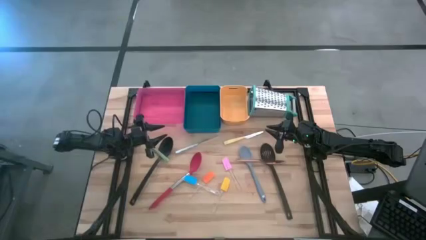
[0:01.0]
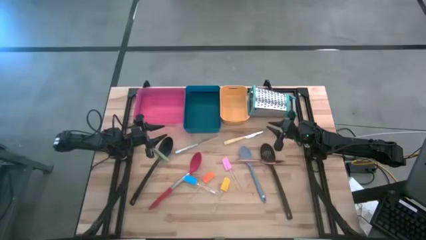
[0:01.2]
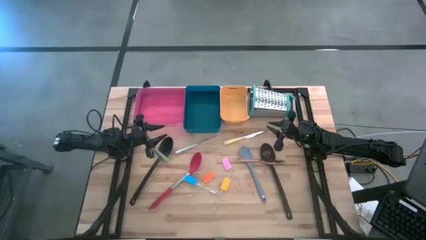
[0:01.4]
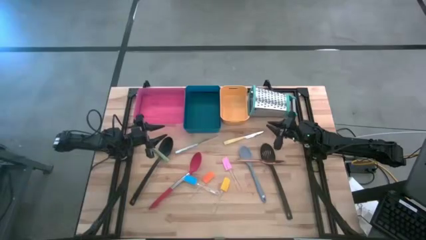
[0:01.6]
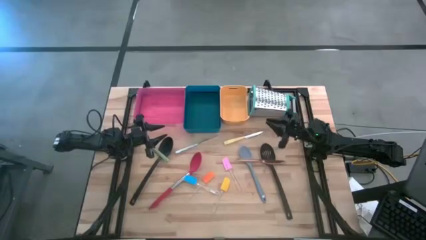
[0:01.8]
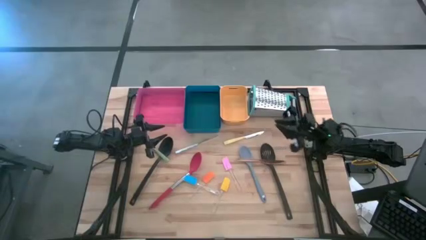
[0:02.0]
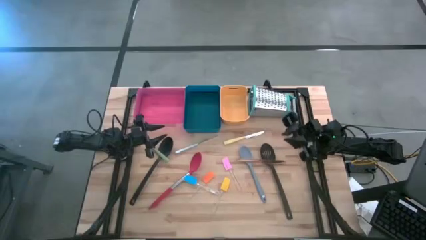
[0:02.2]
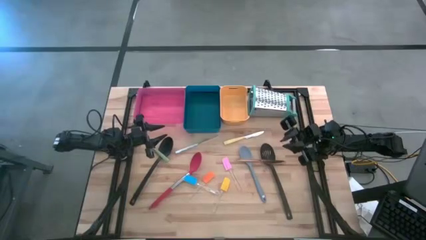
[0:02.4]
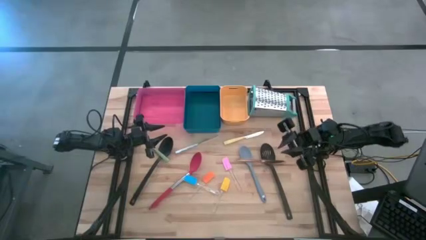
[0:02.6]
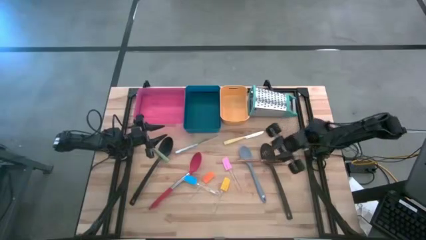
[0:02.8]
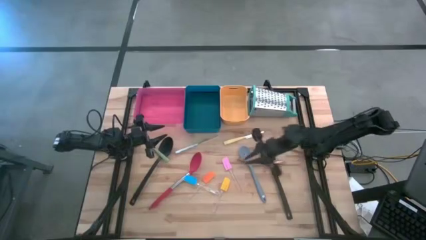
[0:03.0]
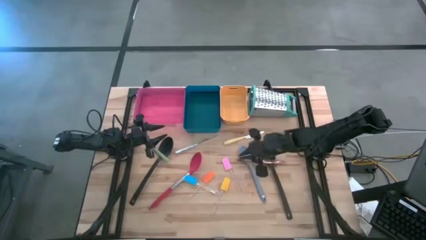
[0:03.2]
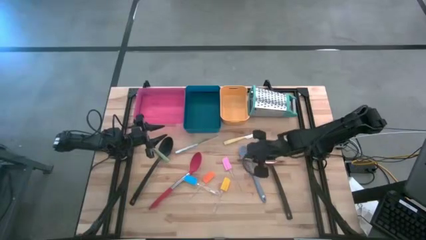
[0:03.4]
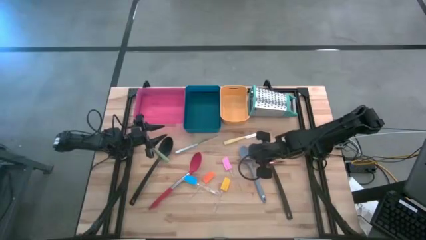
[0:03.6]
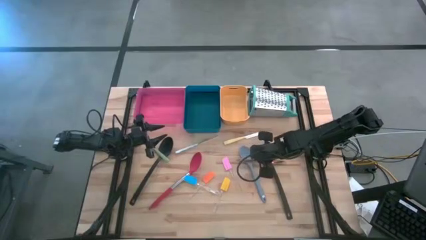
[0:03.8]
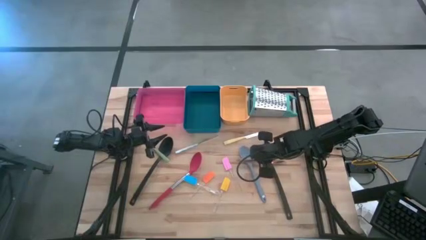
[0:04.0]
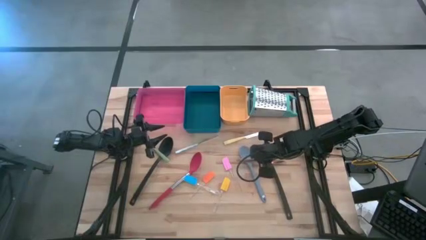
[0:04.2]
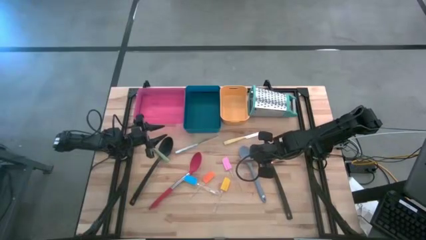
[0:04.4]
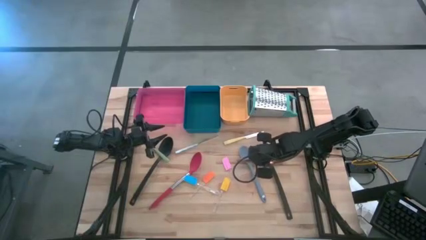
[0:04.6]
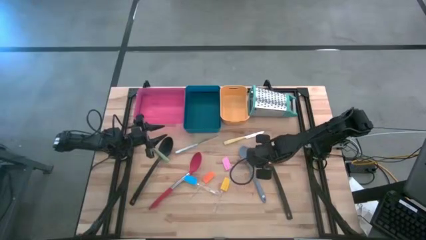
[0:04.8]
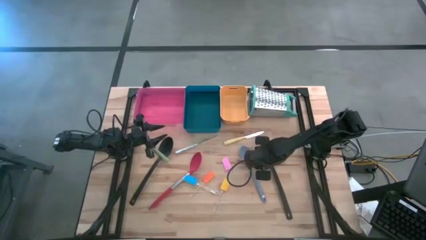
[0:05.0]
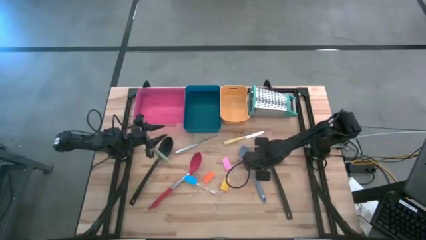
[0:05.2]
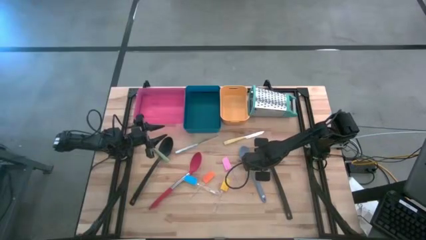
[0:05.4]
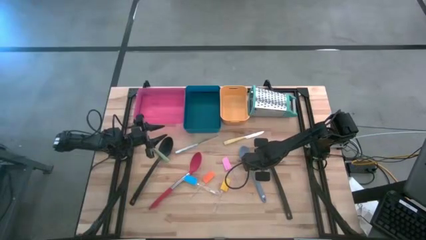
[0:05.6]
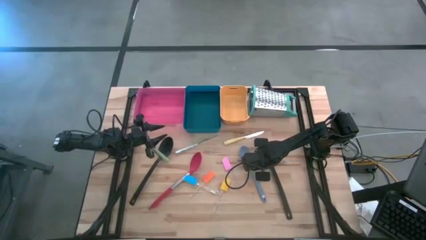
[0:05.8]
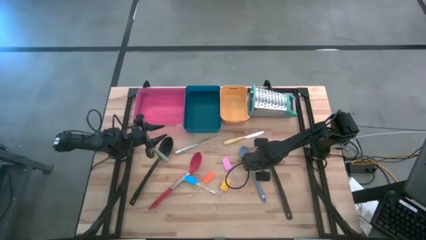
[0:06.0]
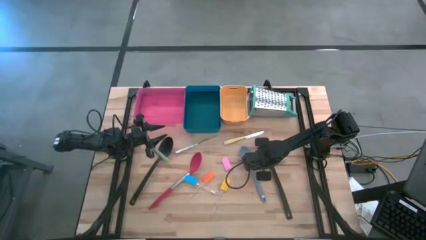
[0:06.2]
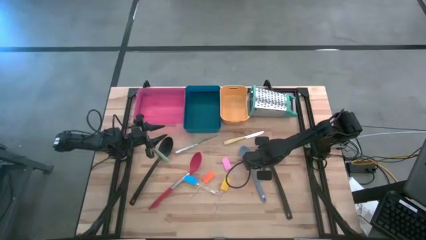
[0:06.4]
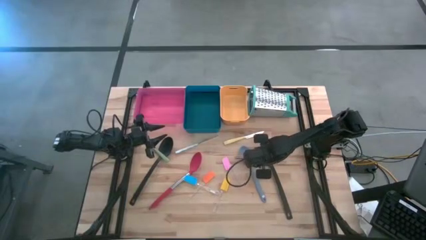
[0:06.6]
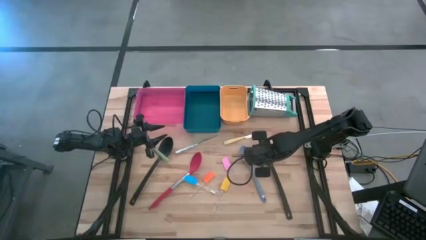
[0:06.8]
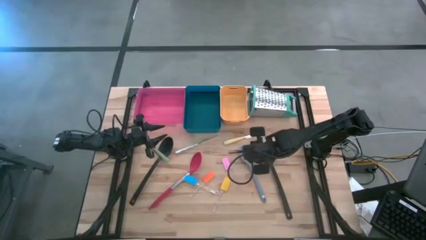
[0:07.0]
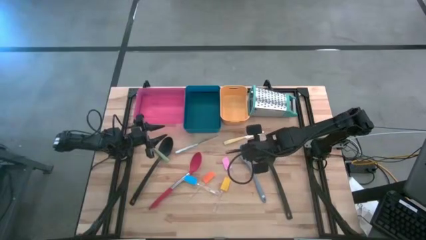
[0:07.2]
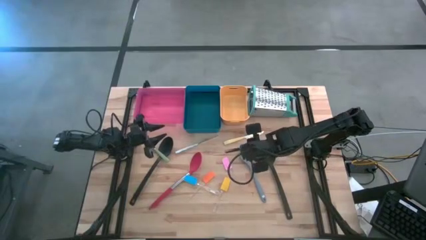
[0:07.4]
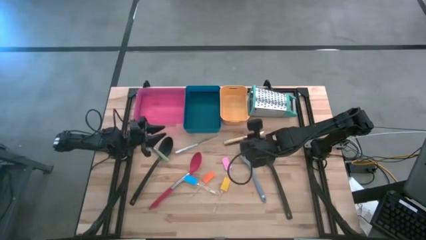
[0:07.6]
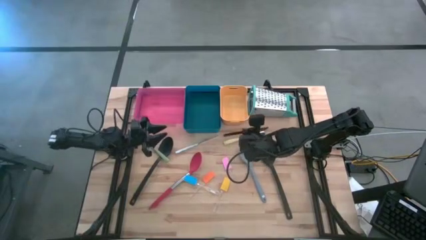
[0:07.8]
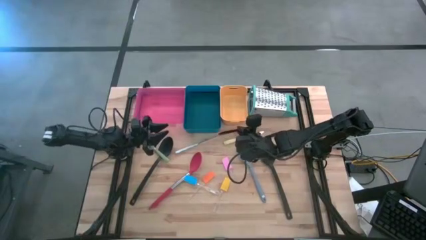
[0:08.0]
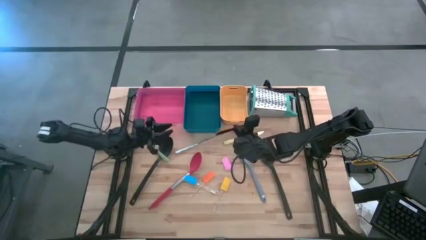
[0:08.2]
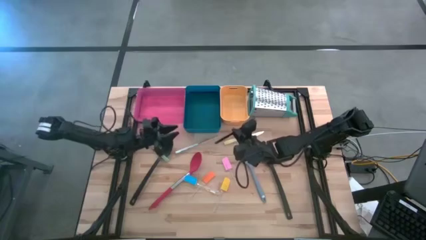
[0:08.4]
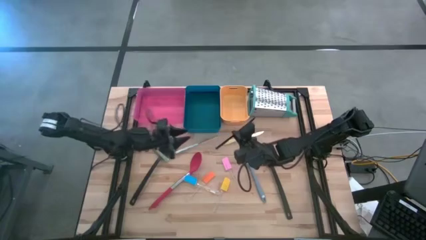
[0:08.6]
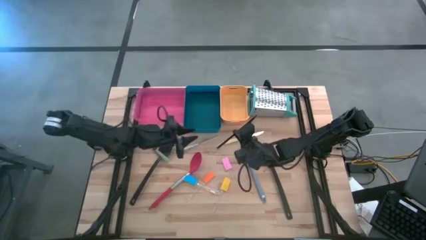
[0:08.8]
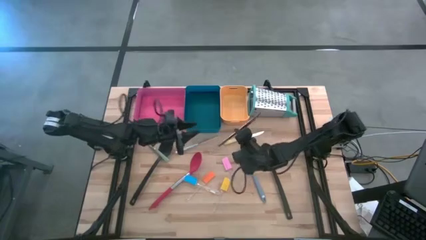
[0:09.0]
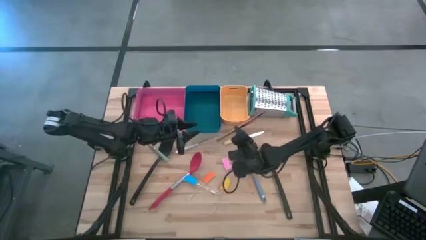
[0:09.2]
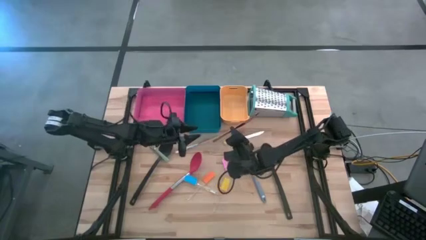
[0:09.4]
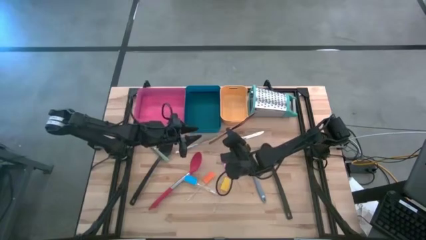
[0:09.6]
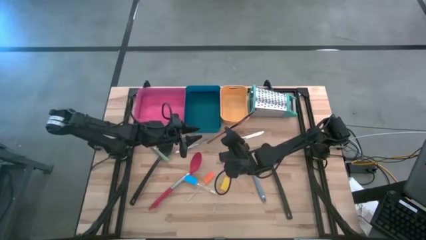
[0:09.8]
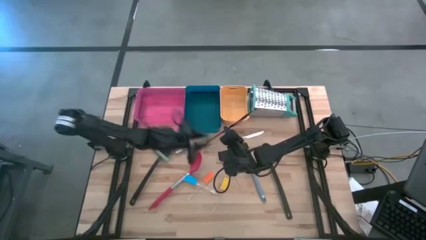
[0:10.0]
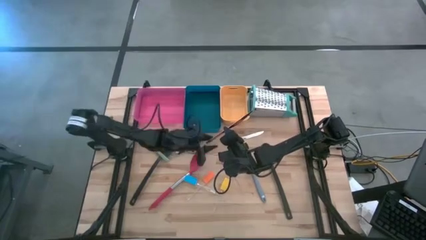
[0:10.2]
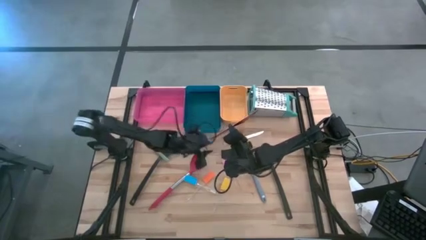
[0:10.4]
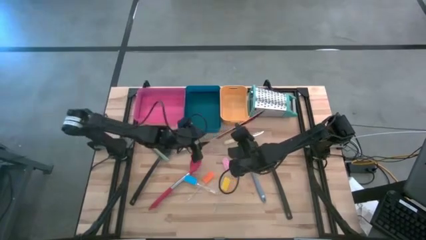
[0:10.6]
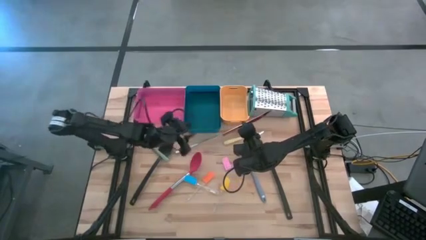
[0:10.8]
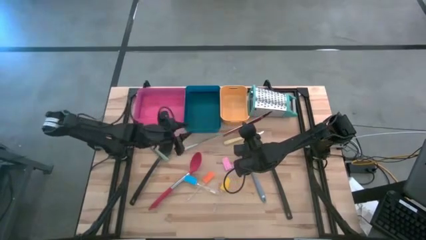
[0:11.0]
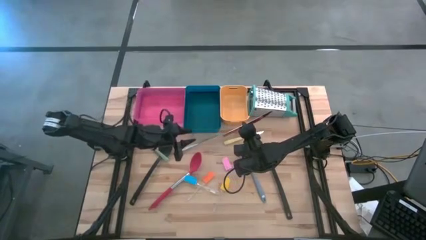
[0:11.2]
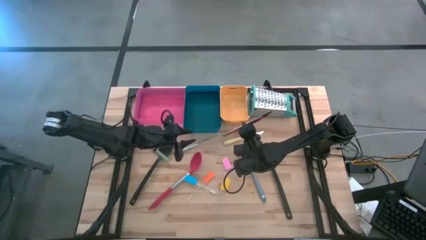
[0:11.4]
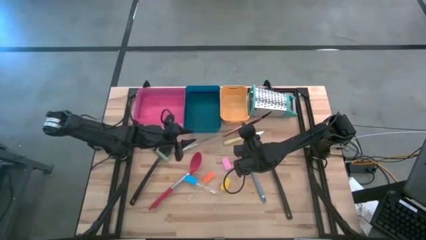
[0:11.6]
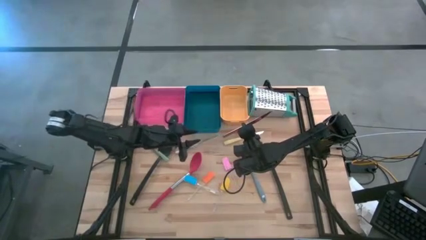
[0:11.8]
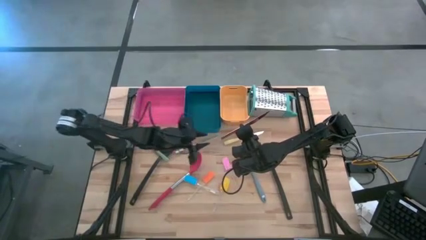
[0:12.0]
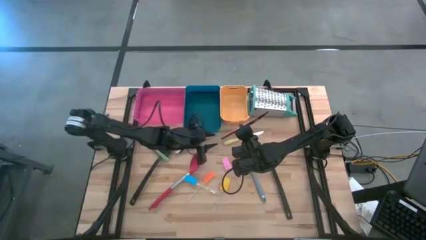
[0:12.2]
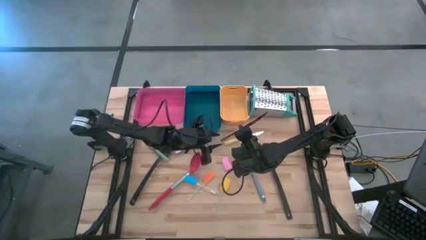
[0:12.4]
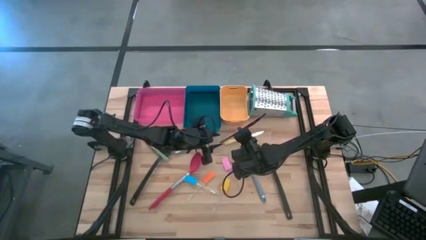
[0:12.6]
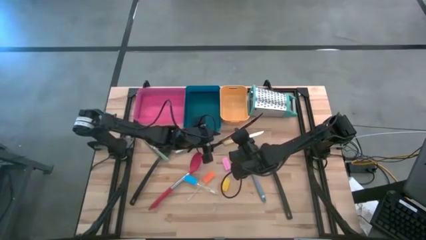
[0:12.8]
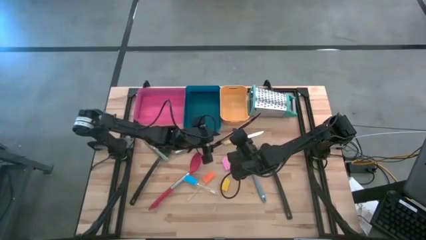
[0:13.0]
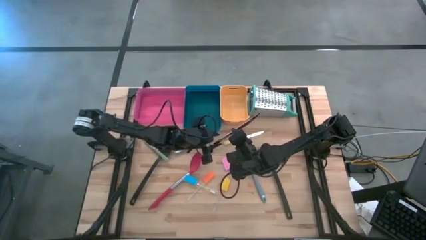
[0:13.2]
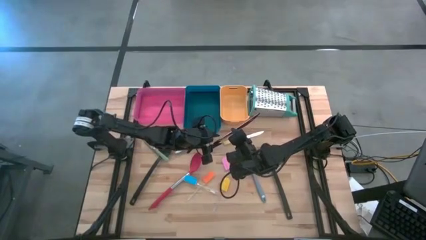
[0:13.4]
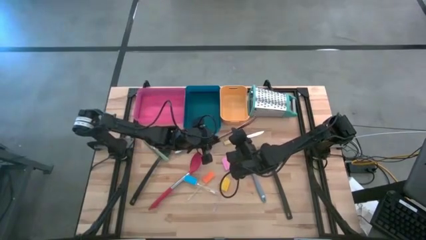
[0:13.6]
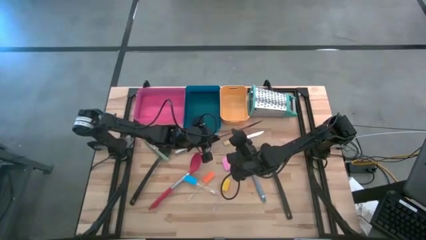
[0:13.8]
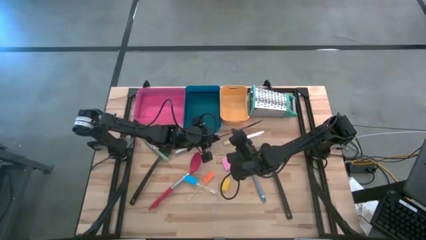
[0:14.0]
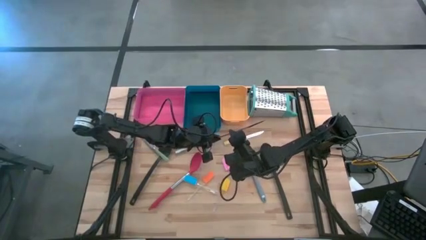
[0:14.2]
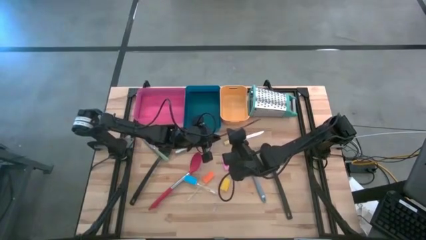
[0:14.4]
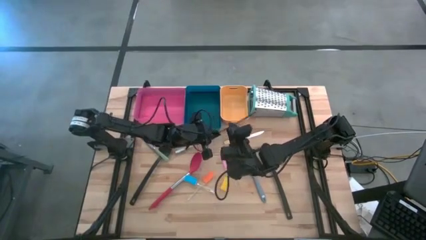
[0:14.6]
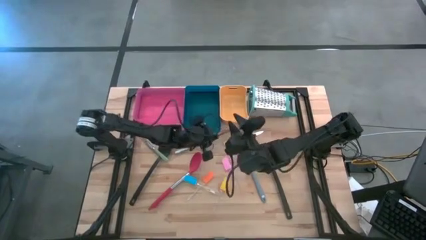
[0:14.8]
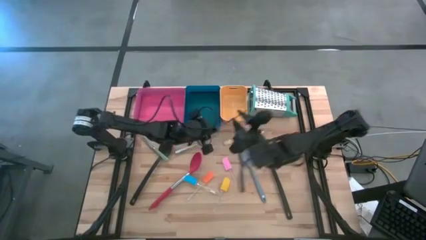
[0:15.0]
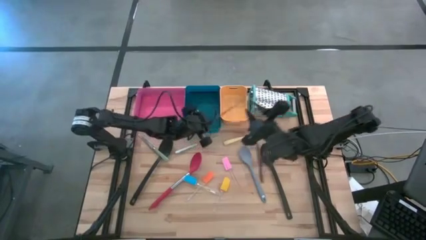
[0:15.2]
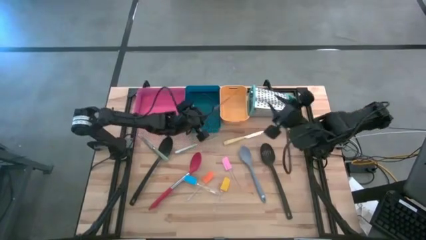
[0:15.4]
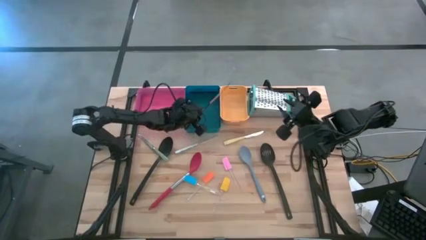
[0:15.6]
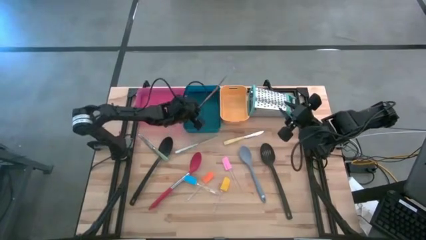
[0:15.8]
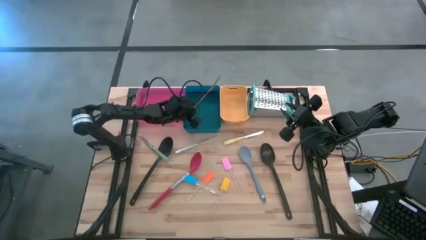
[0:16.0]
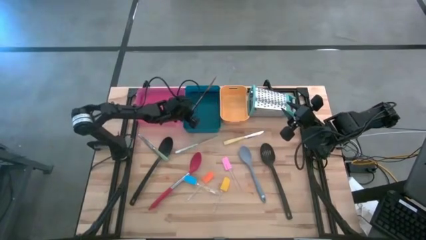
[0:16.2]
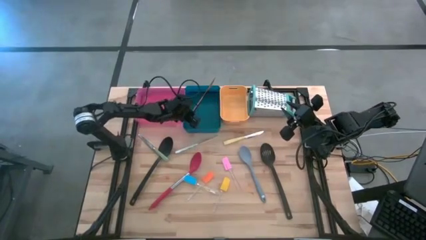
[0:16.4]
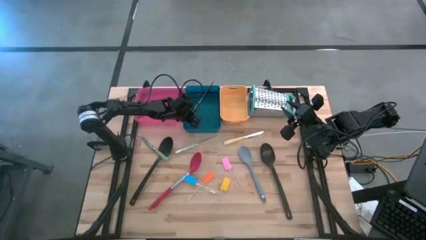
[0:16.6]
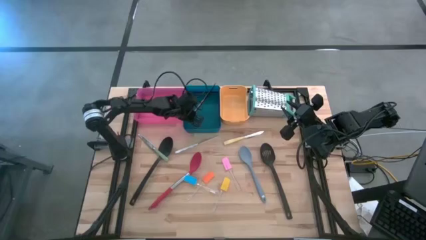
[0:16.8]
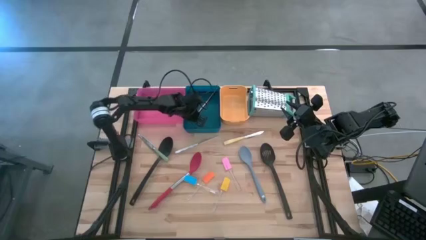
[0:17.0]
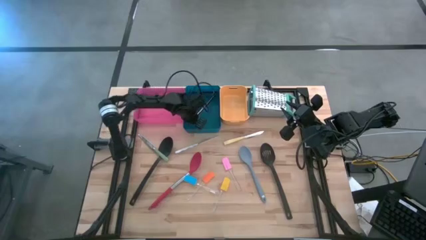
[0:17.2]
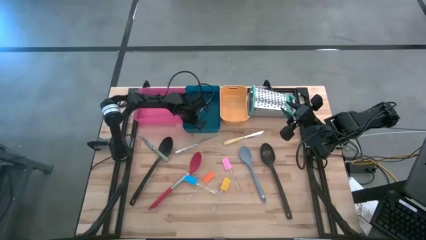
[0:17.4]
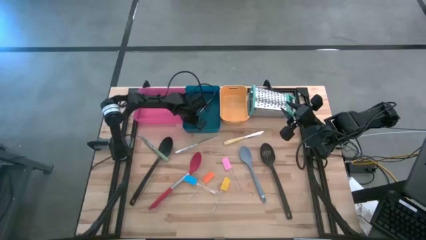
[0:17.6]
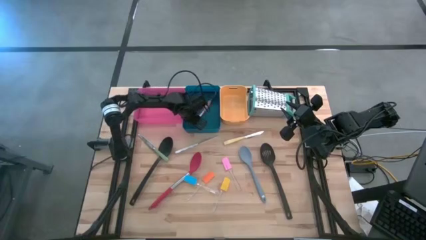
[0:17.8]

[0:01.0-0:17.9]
Task: Pick & Place Kitchen Items
Put the gold knife into the blue bin
